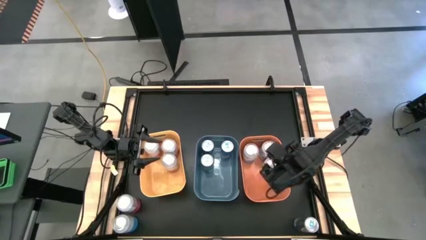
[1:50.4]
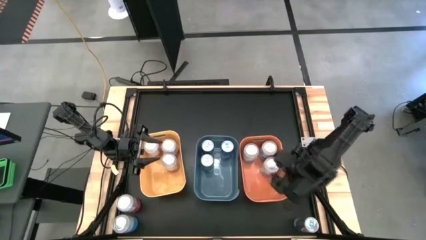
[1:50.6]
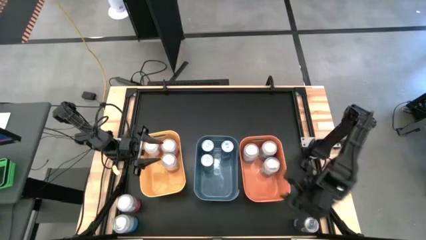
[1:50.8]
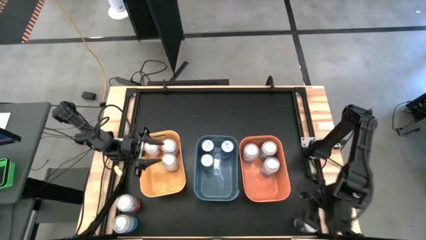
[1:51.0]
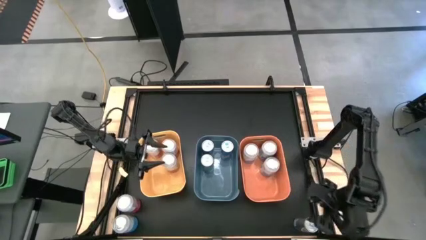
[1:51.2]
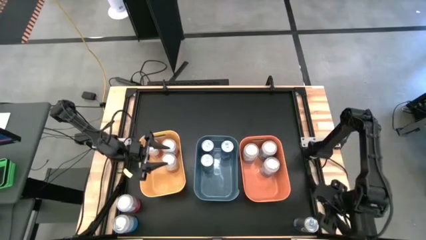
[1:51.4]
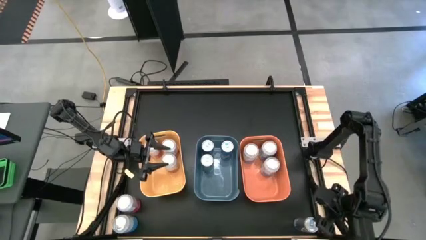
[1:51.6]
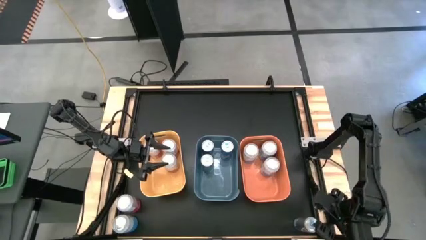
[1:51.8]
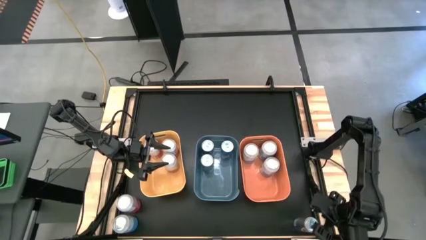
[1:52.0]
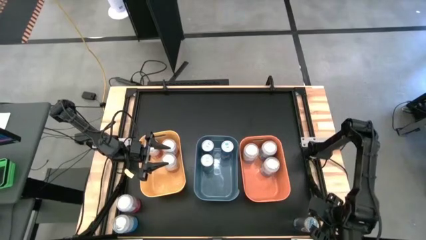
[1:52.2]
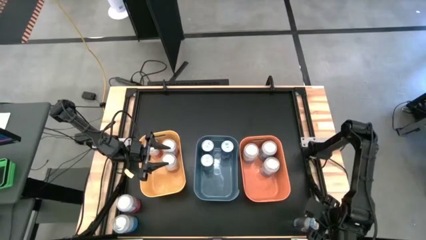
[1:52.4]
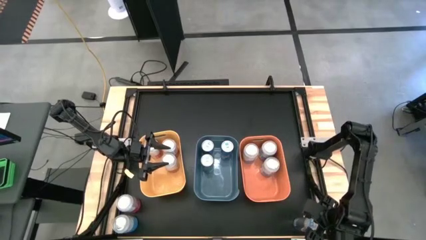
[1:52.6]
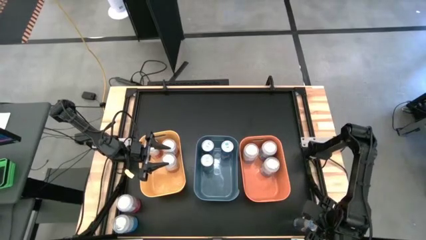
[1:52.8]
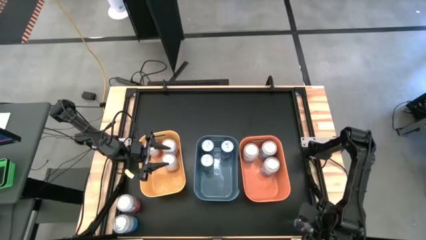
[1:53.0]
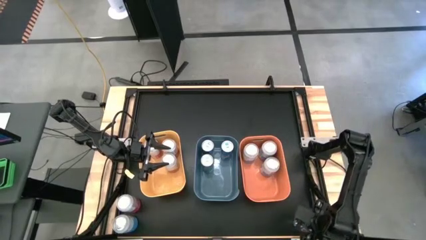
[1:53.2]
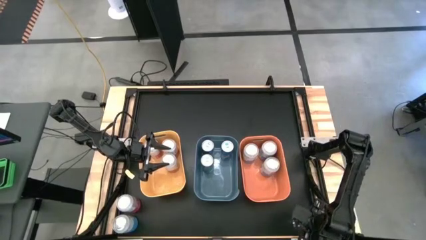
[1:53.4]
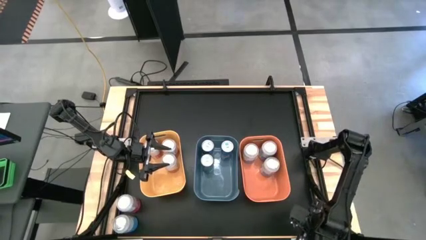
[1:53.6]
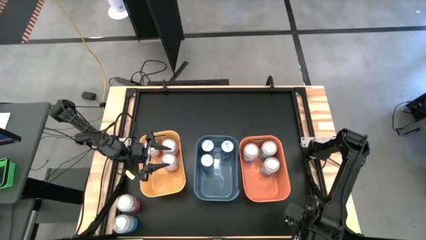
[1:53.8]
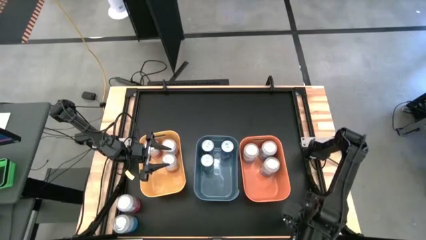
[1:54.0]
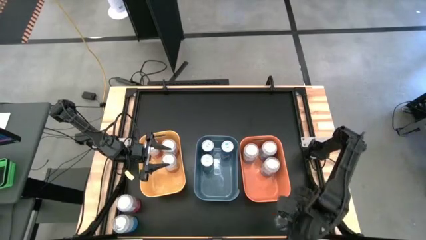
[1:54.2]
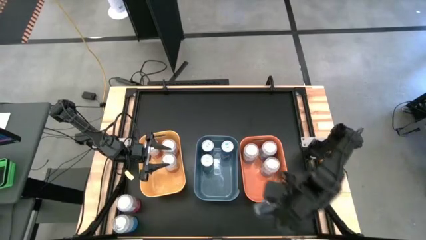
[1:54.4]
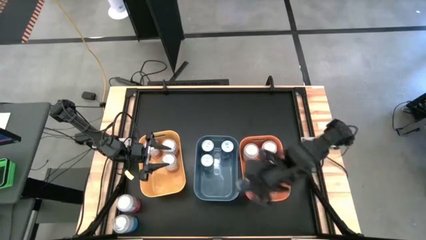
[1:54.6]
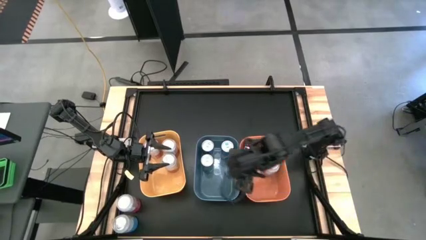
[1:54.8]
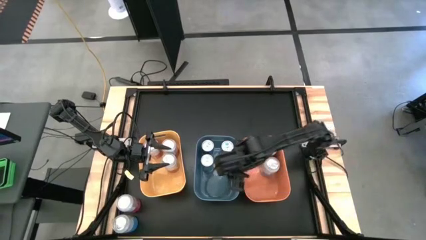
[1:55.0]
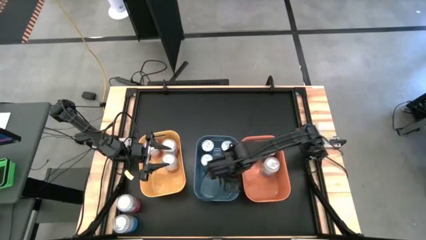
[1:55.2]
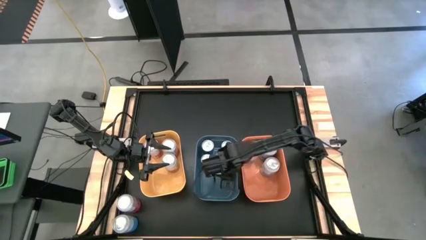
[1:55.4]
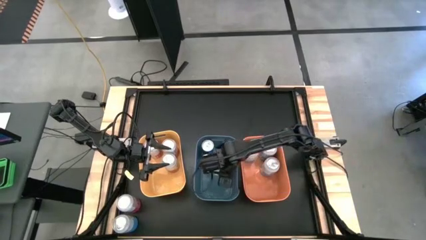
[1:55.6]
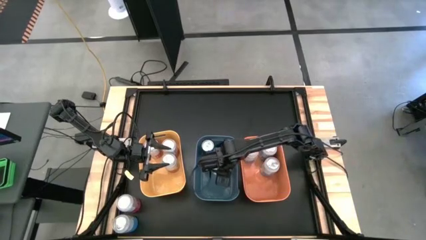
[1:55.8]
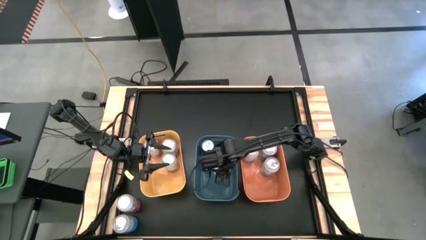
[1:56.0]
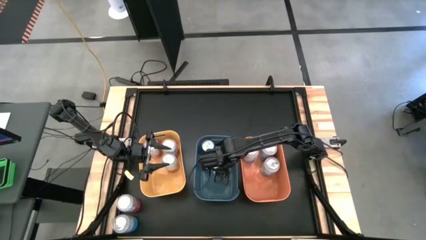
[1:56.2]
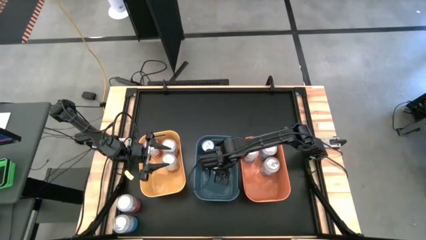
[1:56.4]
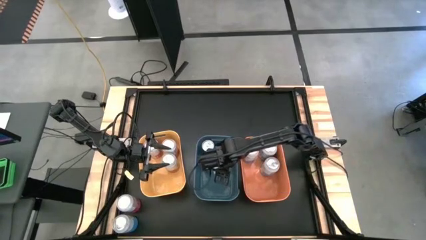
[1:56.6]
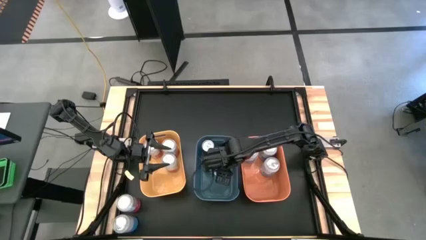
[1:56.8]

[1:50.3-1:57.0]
Task: Sort soda cans
Put the blue soda can into the blue bin

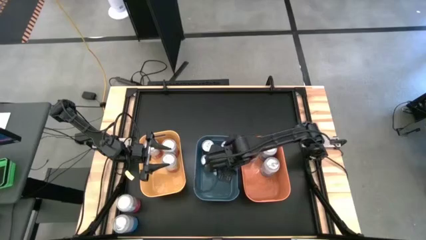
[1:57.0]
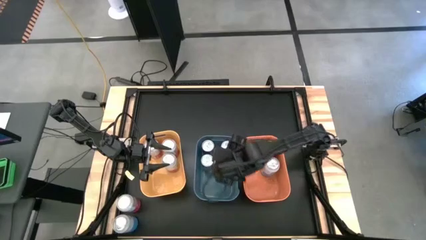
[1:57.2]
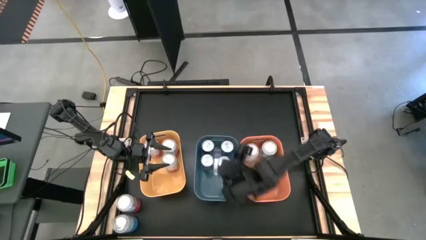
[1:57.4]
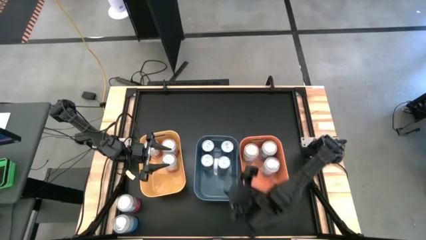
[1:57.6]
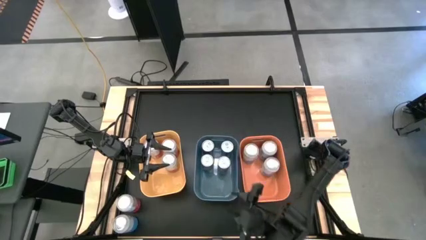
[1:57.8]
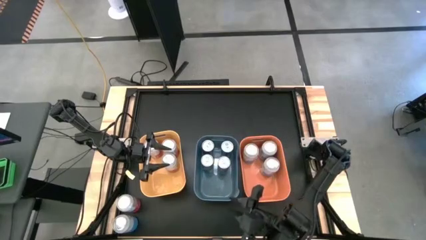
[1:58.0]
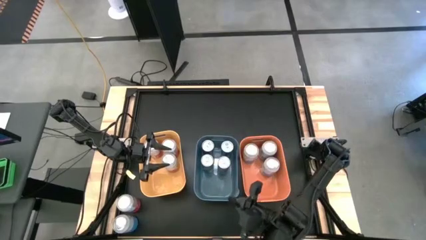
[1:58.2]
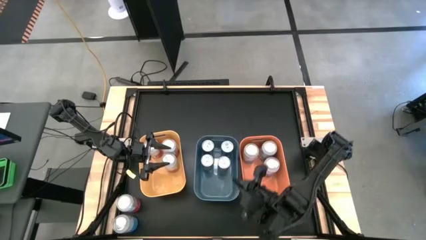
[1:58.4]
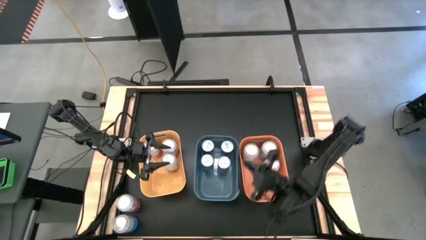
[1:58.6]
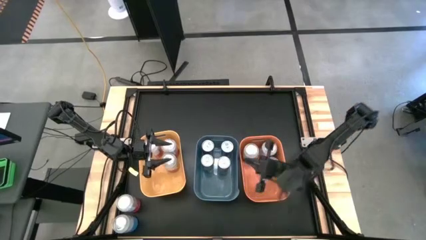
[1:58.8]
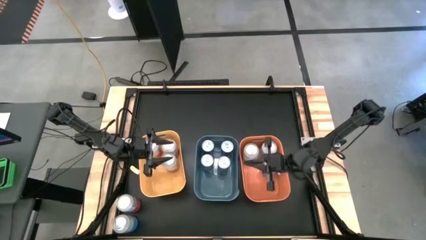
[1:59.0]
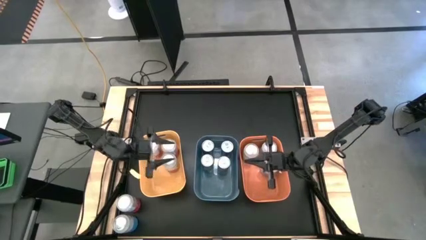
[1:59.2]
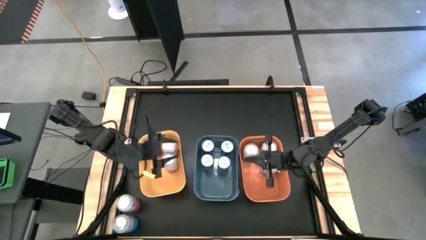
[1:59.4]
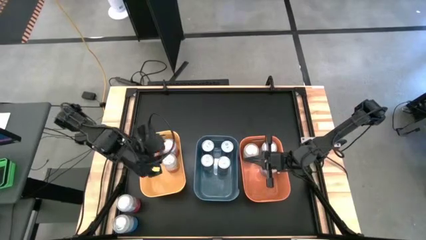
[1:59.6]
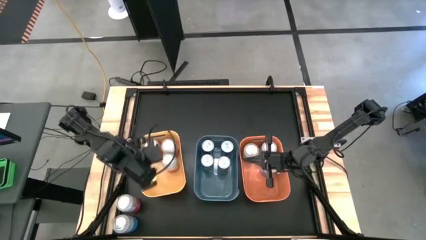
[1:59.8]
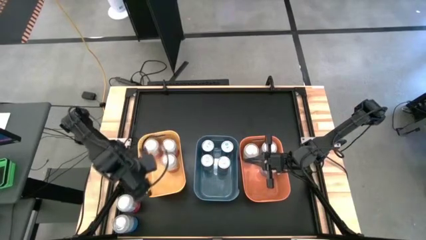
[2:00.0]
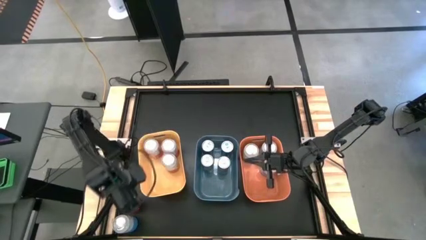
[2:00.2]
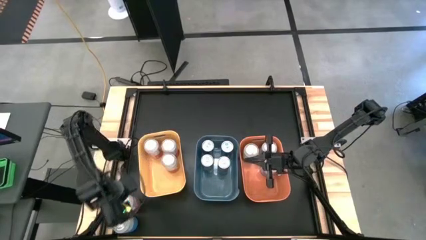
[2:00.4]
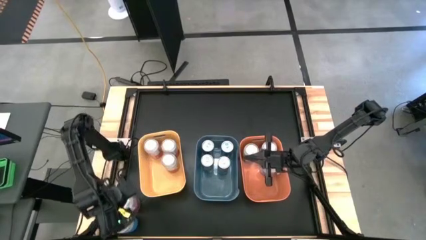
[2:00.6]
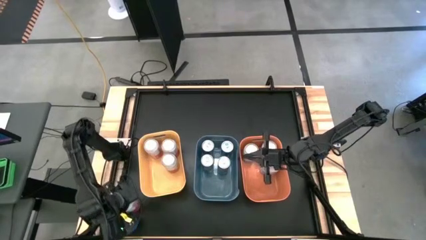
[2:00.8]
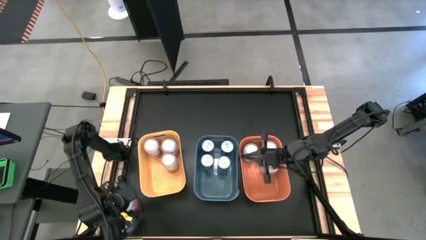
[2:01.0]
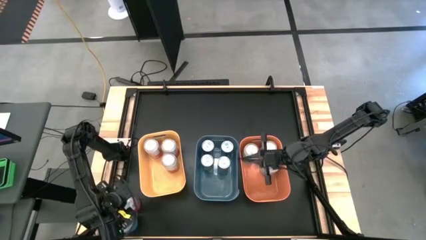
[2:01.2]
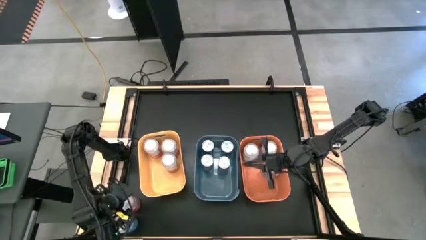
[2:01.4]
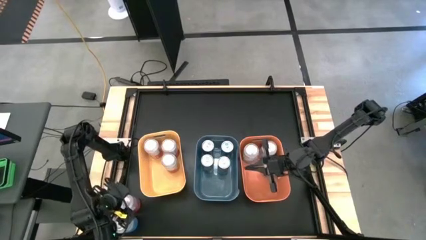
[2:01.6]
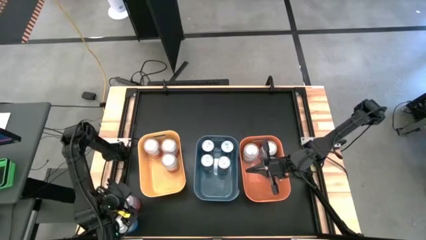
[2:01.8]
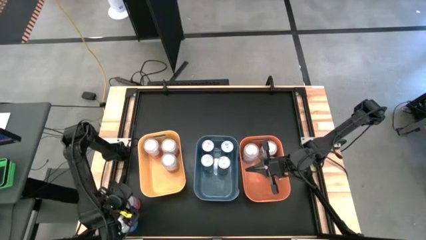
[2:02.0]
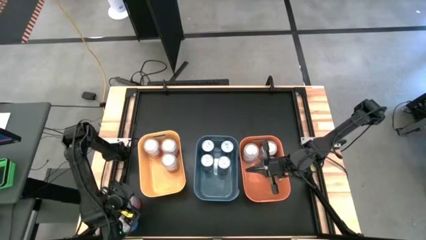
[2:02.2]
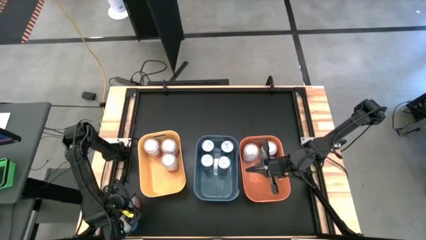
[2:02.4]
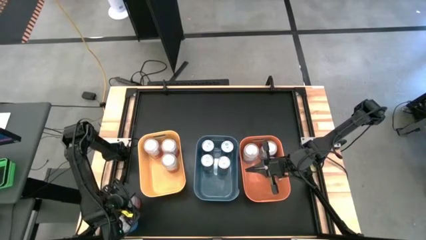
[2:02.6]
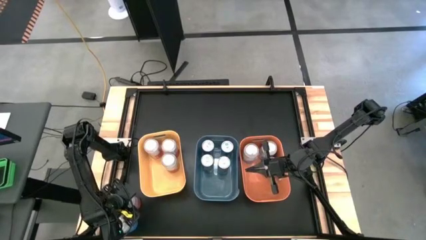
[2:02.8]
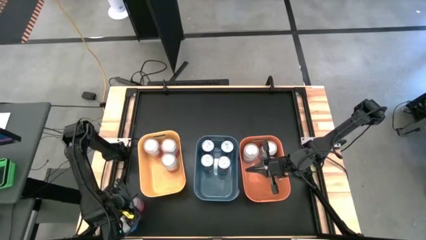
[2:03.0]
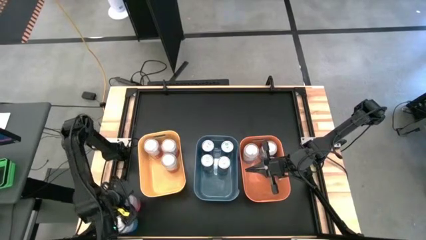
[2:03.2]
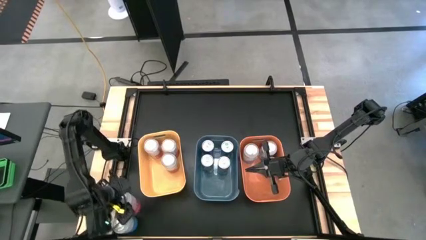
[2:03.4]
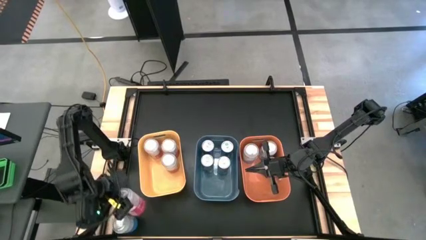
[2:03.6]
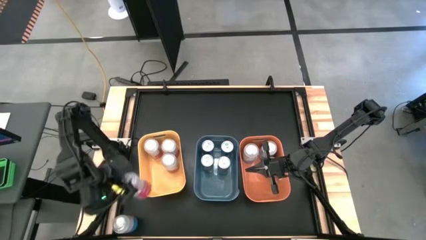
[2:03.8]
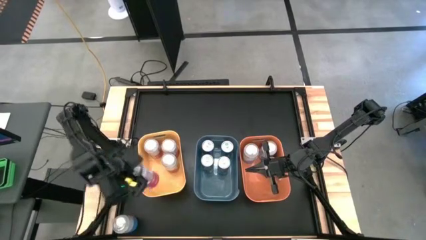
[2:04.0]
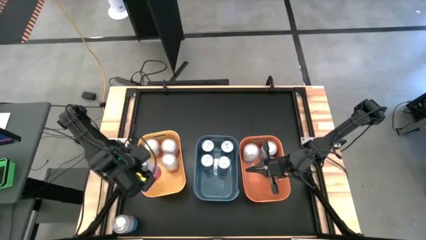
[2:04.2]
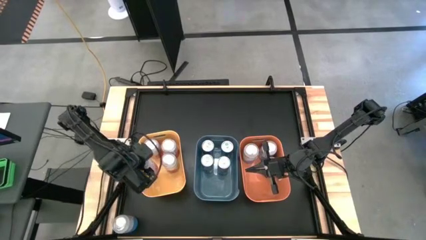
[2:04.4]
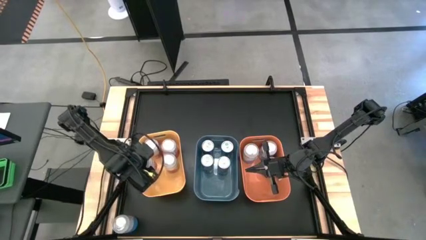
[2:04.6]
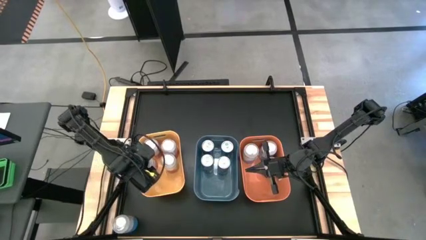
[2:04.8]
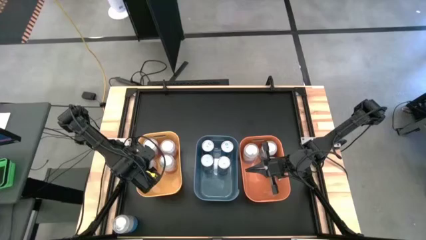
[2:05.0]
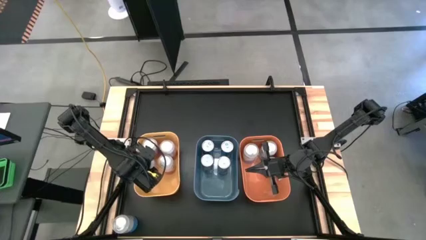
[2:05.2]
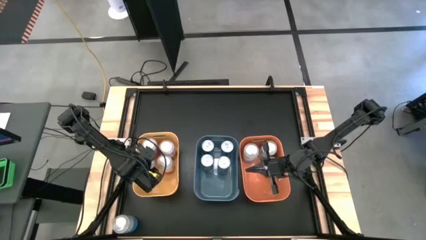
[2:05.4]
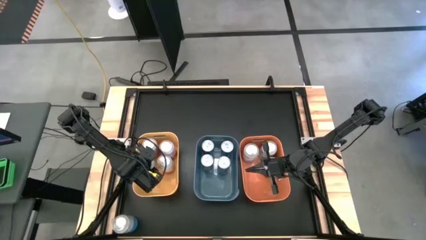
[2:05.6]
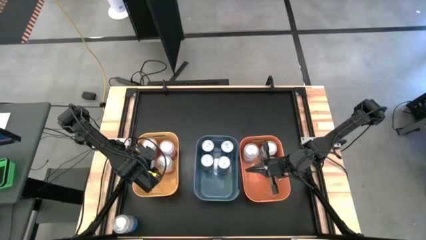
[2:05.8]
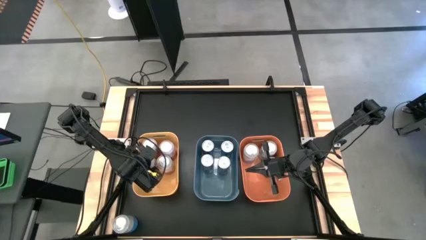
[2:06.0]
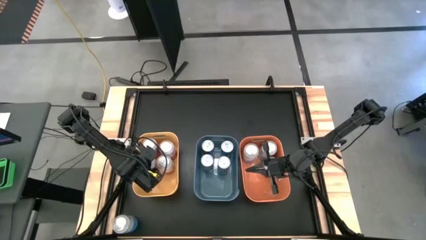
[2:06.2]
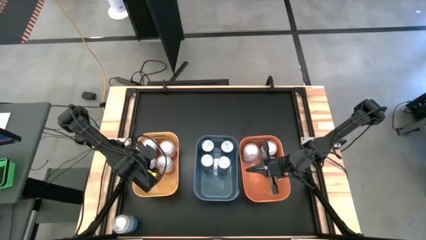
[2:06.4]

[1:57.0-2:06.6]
Put the pink-white soda can into the yellow bin
